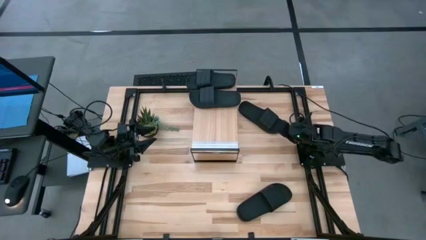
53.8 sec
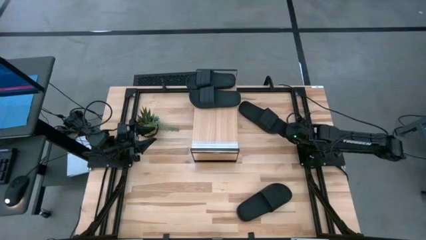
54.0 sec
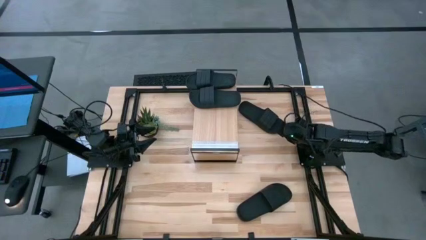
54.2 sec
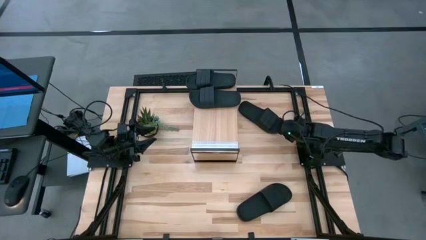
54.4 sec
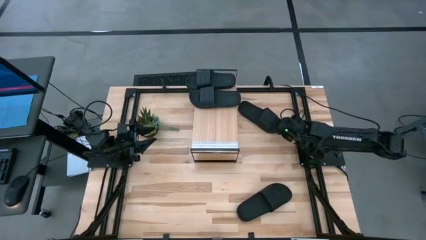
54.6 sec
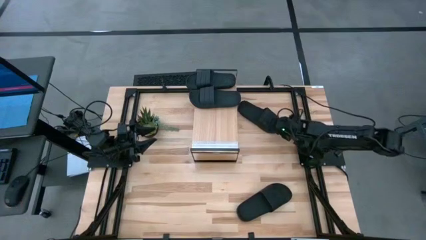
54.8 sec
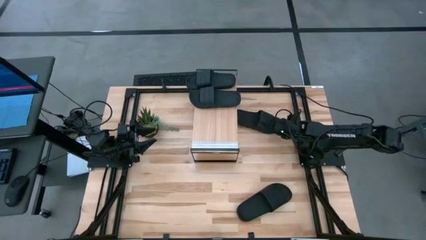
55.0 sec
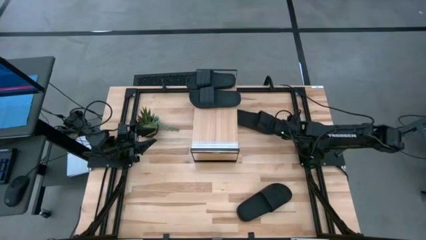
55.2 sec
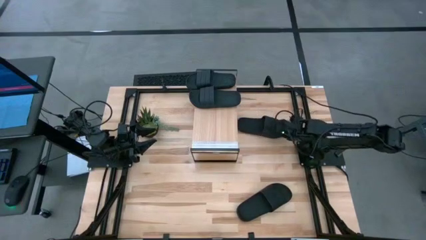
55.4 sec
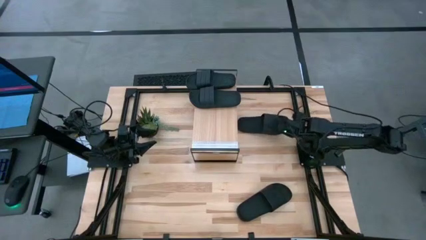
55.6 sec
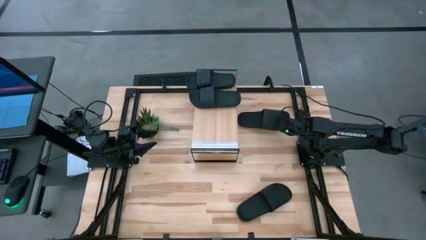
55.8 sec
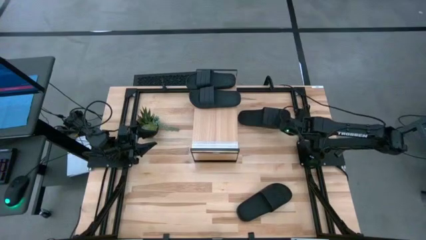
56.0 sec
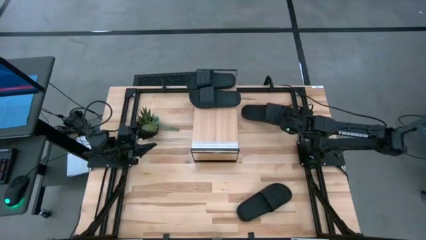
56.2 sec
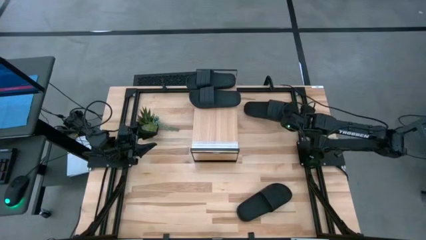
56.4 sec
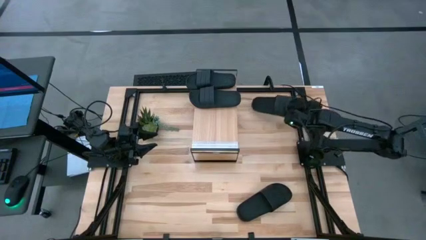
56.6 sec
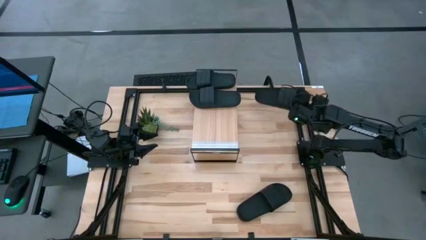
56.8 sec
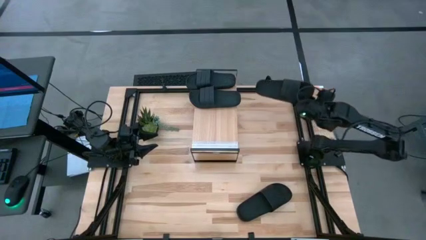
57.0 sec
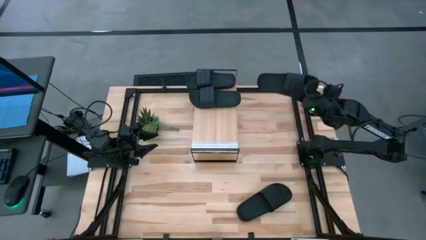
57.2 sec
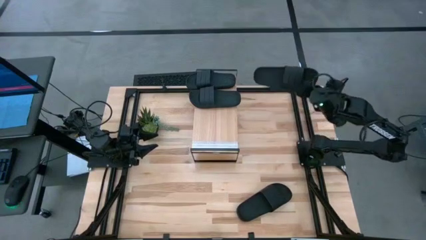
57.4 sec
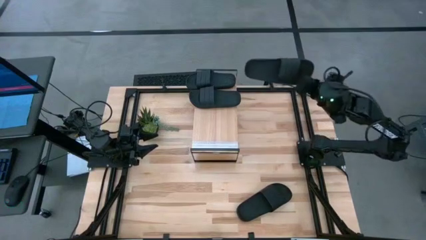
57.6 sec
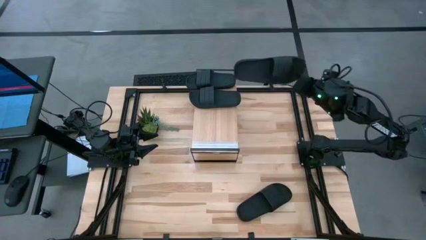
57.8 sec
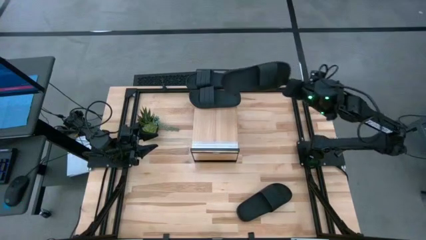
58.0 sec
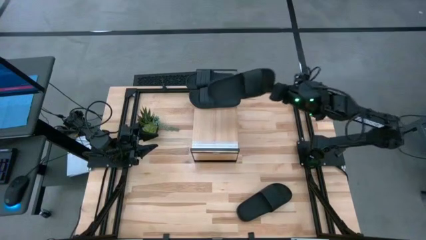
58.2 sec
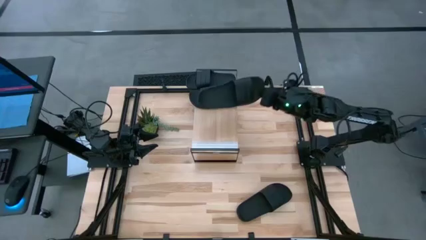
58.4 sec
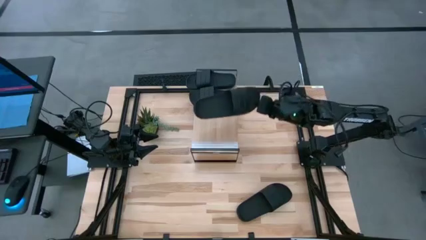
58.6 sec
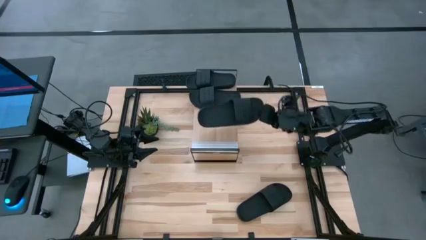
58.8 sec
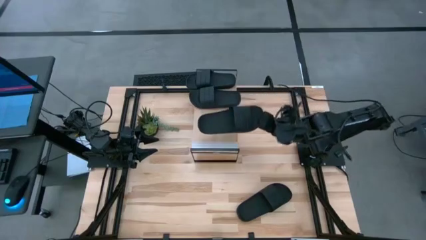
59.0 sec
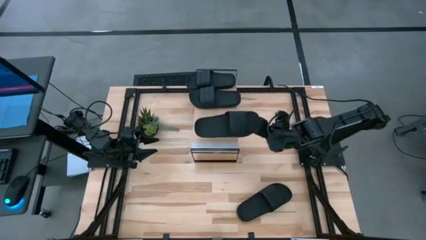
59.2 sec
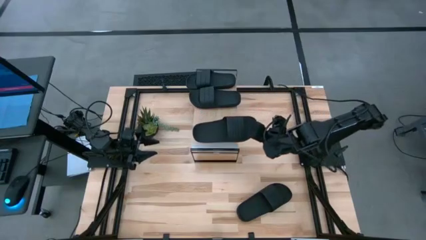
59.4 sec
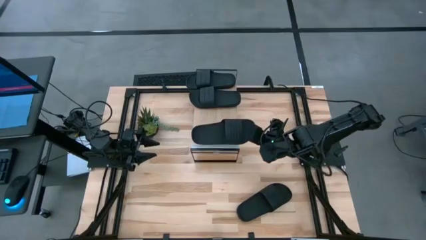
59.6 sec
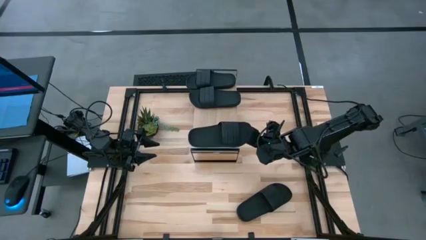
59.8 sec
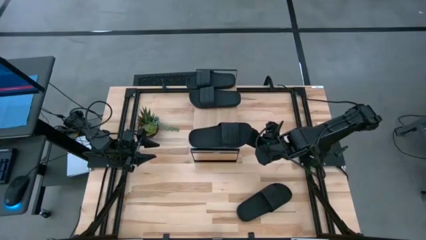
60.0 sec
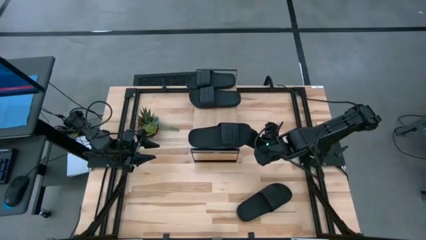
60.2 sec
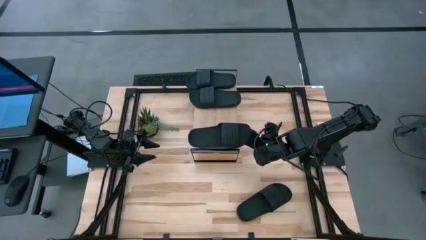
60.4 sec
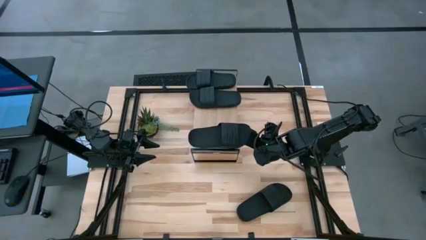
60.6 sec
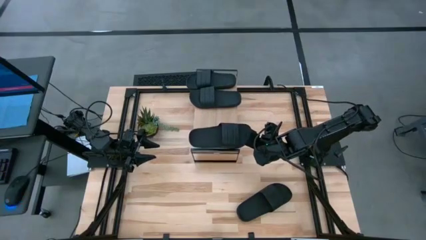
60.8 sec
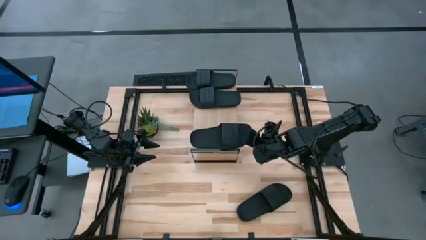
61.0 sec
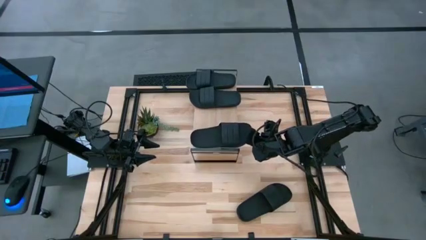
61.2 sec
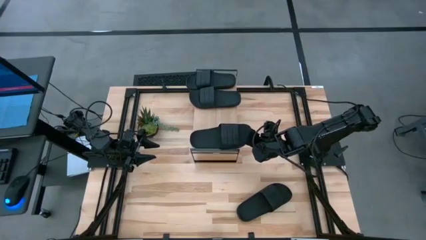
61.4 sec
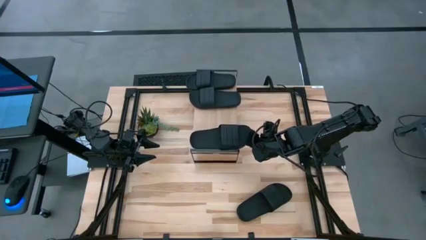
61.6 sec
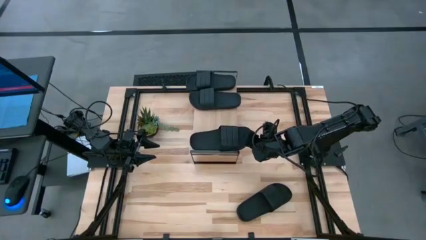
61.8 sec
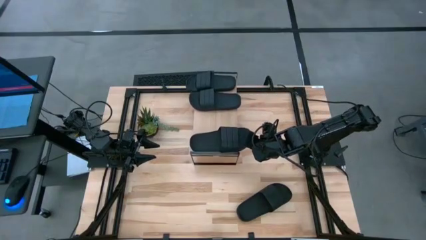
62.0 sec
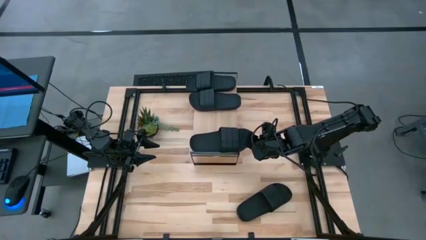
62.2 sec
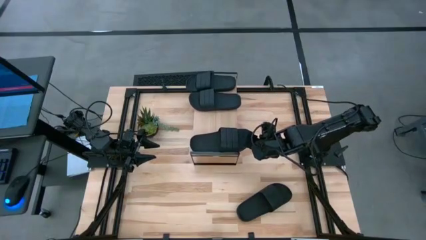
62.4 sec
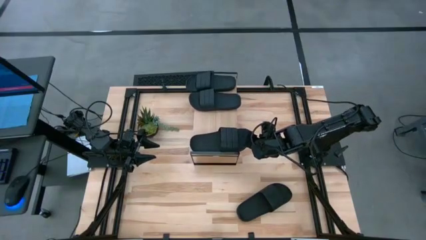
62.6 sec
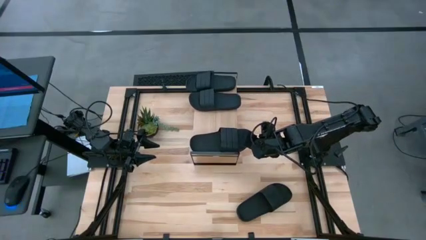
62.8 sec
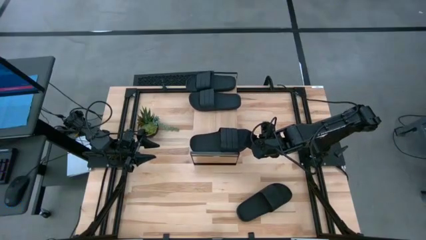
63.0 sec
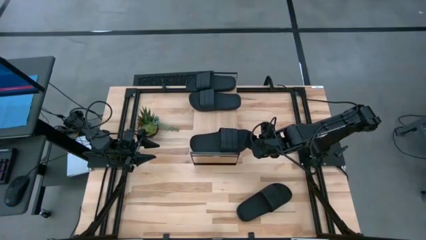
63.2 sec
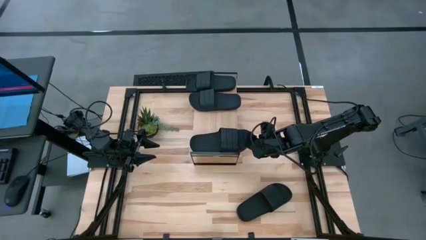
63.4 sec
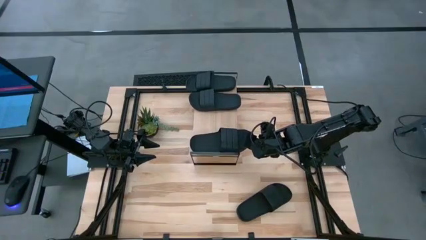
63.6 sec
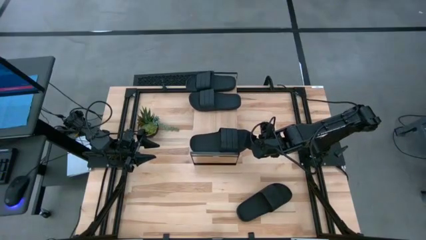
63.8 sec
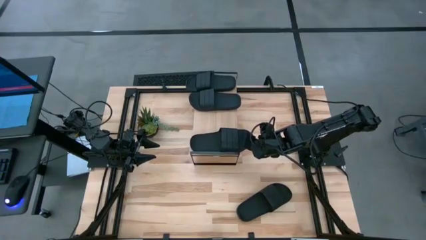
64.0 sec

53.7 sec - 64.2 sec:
Task: Pick and place slides into the shelf
Put the top black slide on the shelf

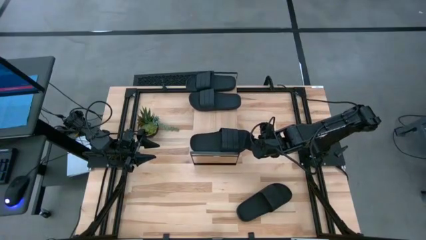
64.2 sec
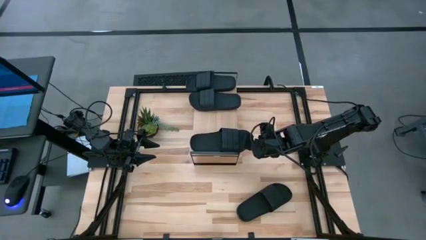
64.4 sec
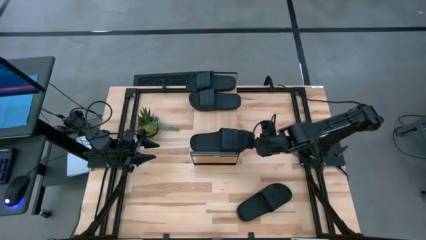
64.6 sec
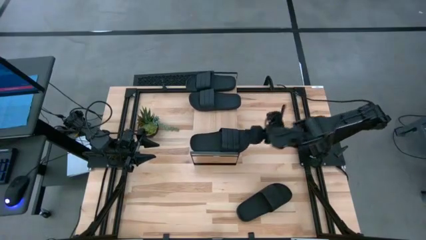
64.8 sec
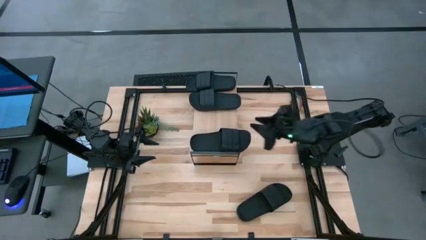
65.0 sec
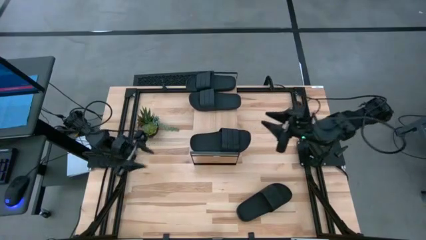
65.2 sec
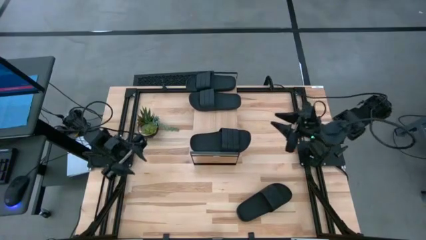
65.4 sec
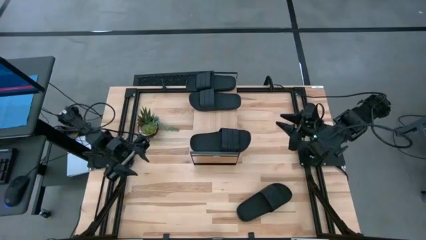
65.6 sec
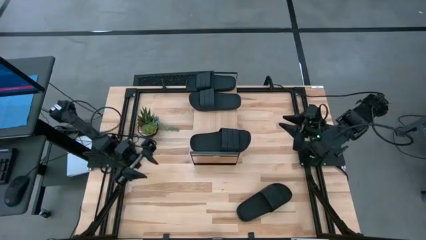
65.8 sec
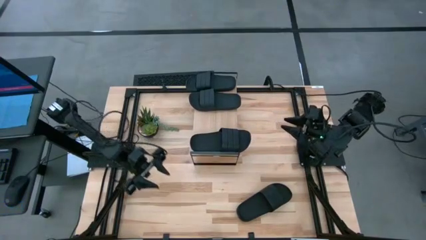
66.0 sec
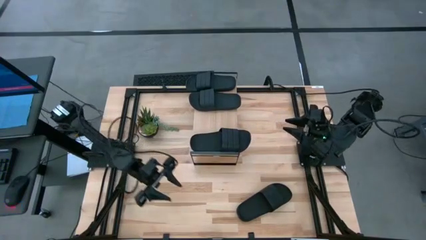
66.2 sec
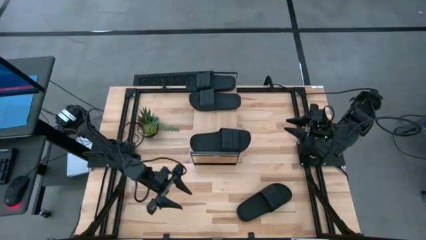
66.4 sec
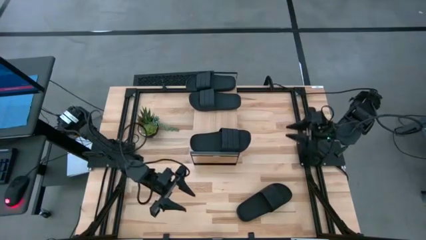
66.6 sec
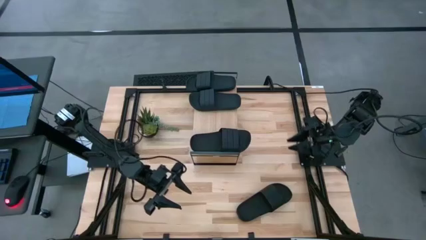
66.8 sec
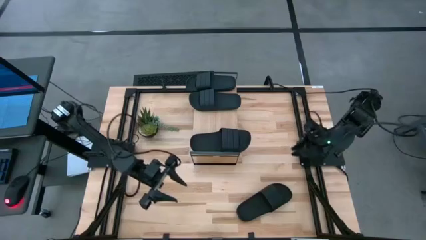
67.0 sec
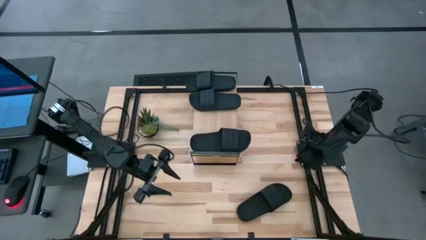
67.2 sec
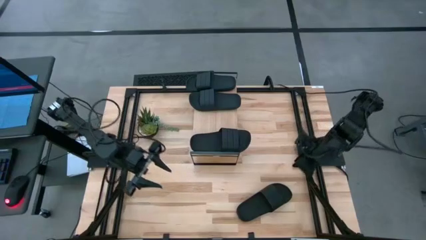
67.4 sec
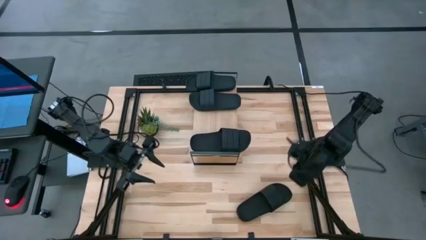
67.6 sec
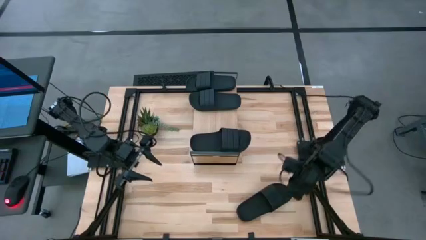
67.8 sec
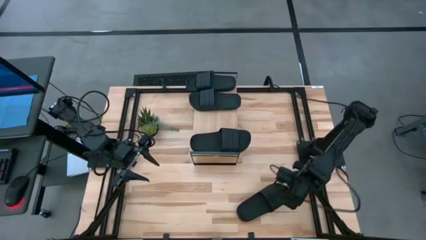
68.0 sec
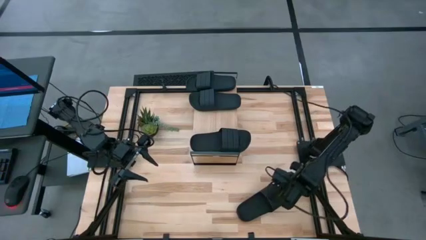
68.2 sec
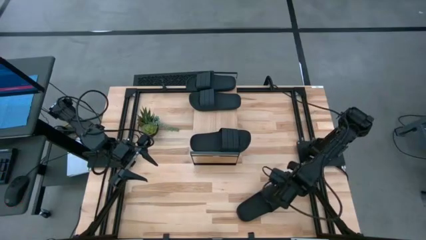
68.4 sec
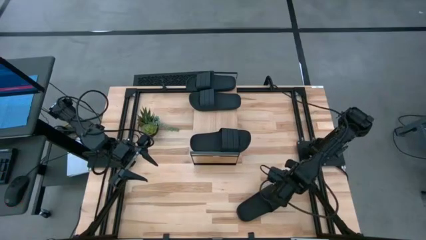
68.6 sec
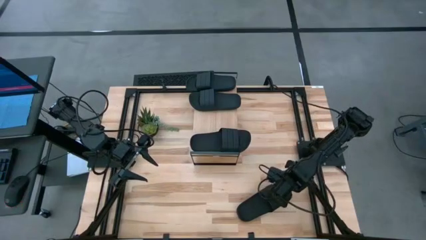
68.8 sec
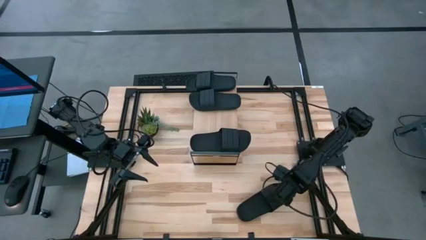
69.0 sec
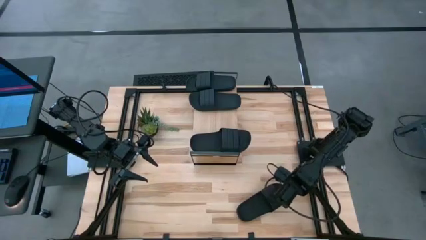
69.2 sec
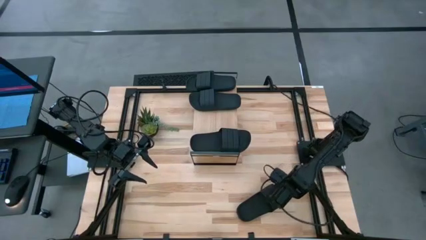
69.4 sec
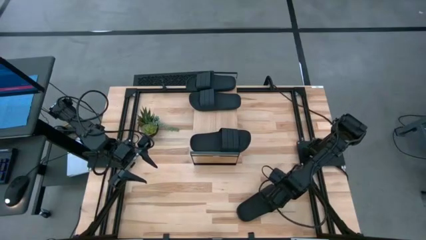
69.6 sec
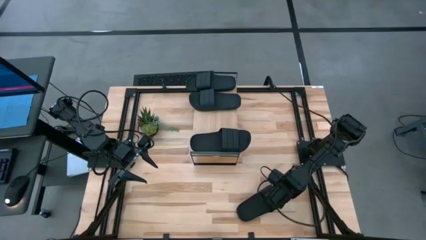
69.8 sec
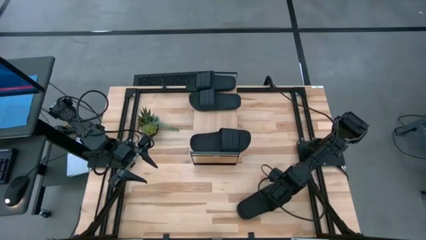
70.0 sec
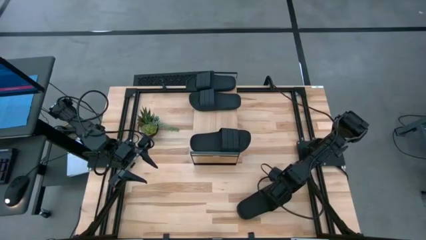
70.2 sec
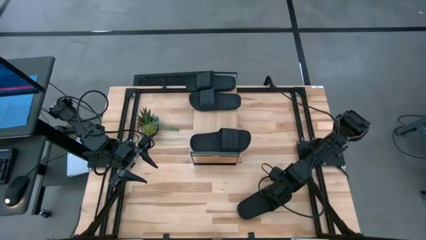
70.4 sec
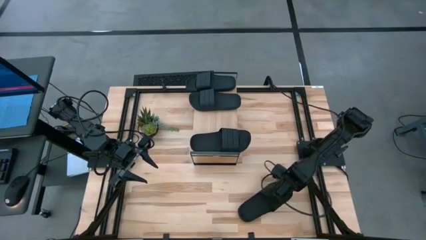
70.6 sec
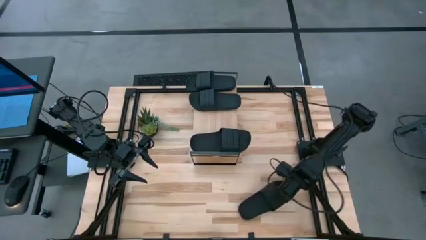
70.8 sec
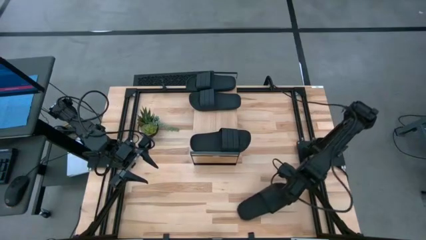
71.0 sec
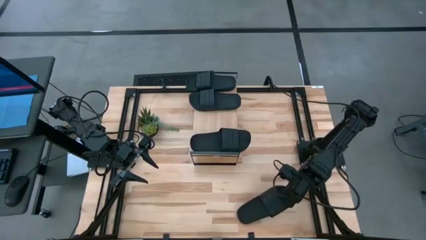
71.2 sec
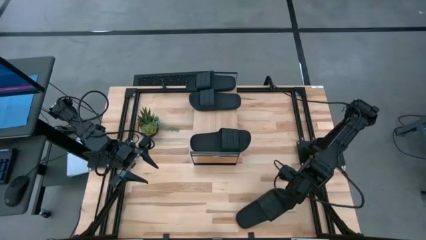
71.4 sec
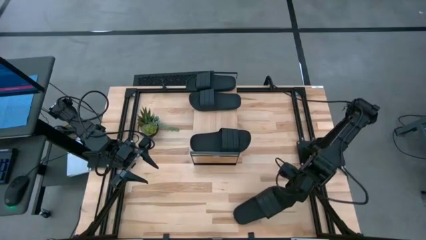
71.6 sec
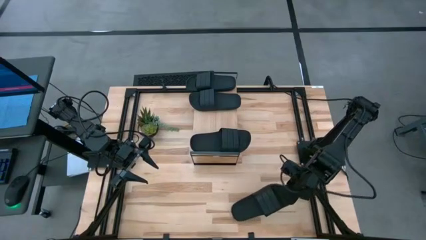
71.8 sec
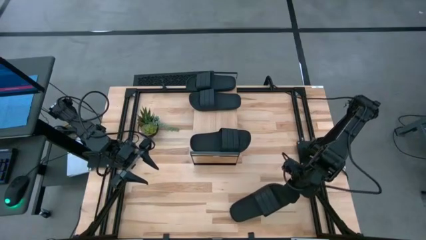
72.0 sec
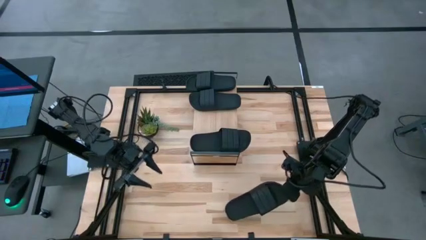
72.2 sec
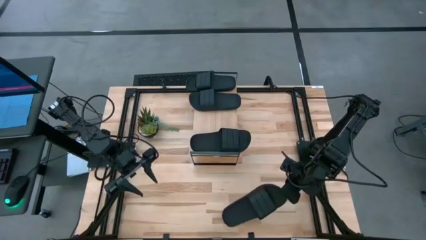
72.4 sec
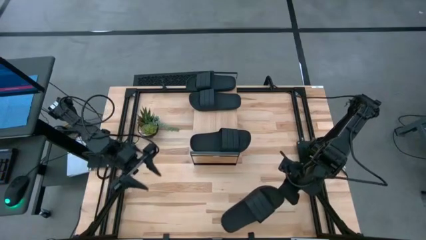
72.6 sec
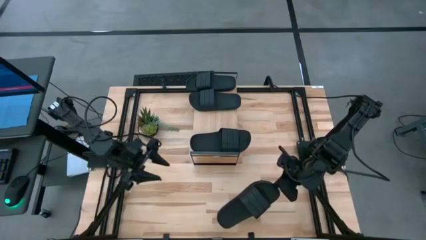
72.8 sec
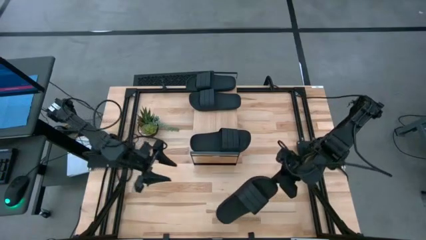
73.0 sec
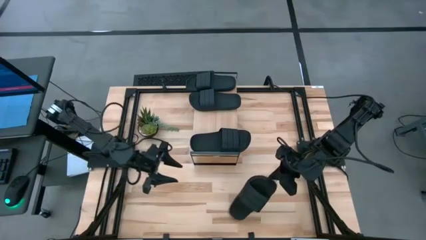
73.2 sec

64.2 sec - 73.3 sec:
Put the black slide on the shelf
